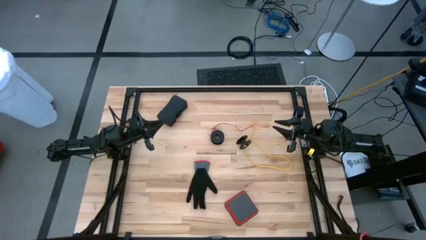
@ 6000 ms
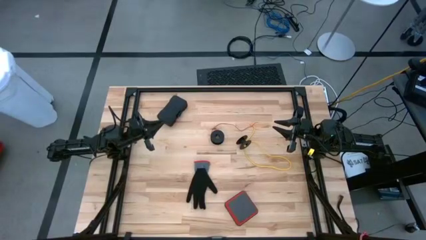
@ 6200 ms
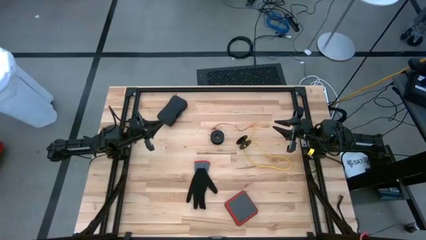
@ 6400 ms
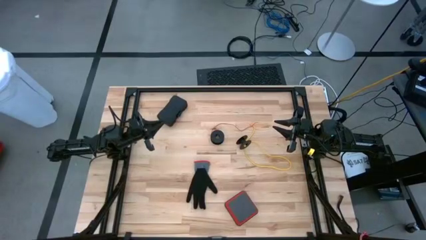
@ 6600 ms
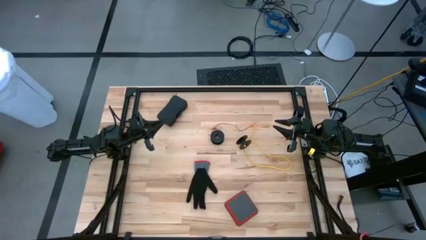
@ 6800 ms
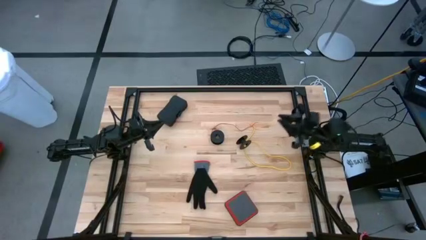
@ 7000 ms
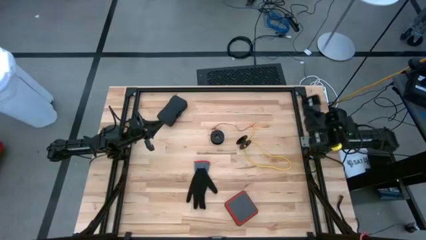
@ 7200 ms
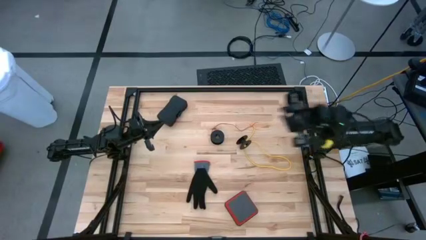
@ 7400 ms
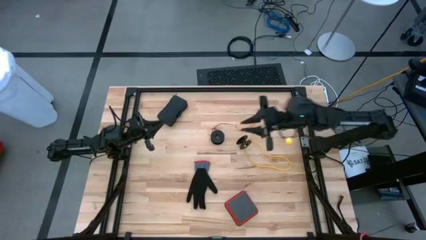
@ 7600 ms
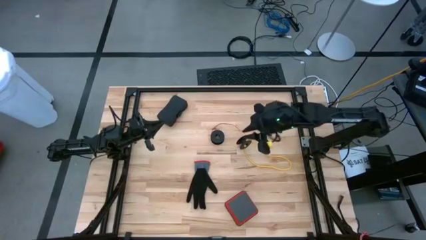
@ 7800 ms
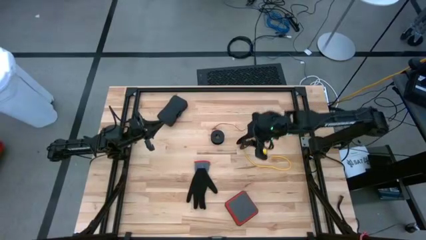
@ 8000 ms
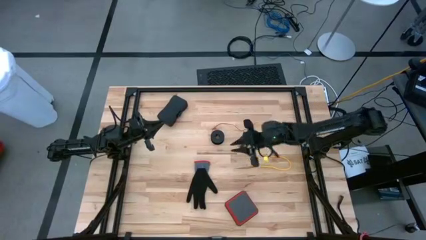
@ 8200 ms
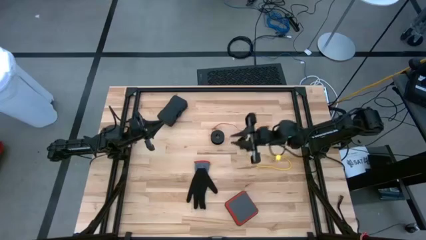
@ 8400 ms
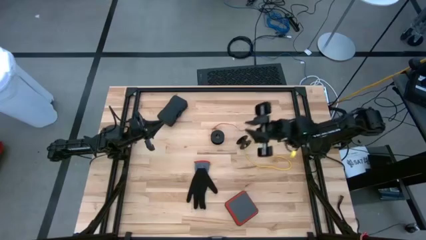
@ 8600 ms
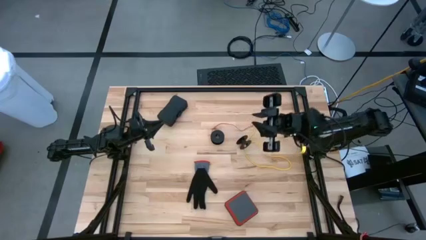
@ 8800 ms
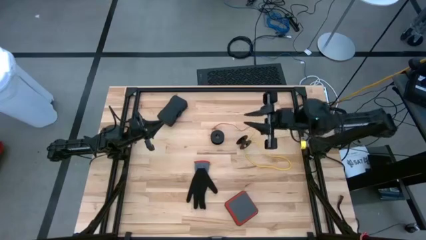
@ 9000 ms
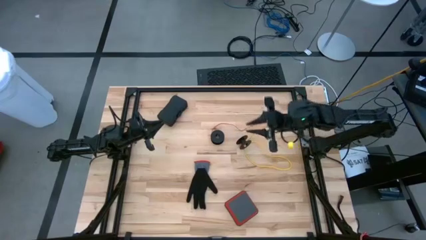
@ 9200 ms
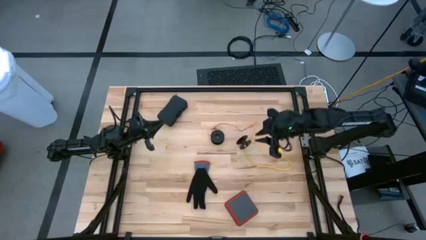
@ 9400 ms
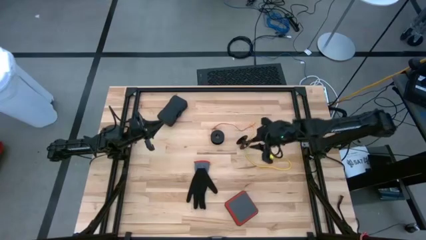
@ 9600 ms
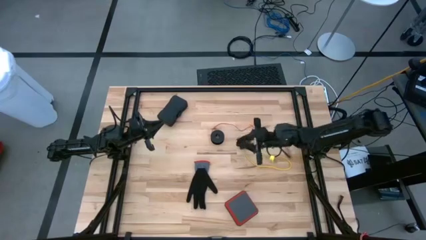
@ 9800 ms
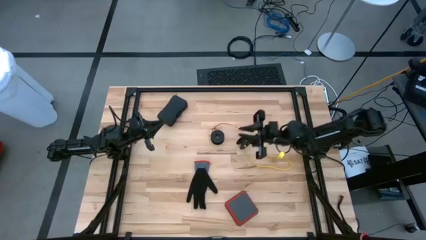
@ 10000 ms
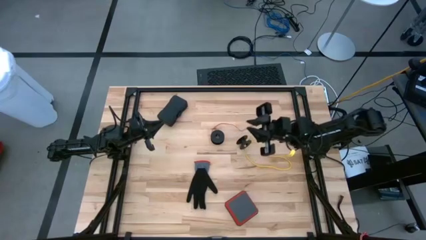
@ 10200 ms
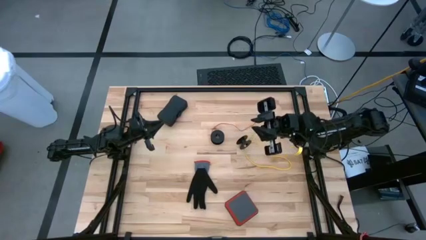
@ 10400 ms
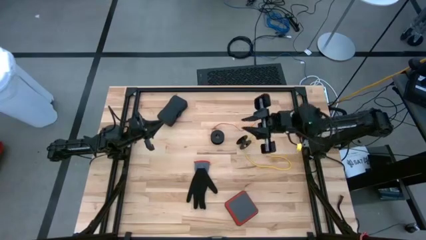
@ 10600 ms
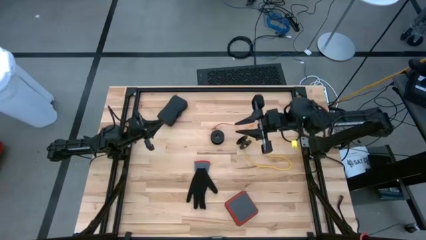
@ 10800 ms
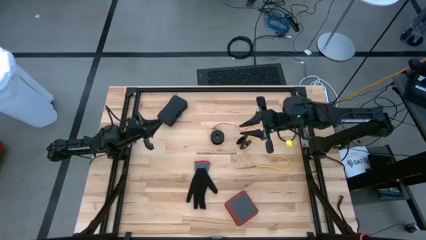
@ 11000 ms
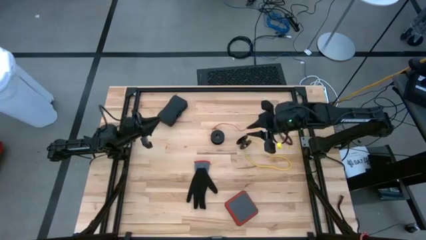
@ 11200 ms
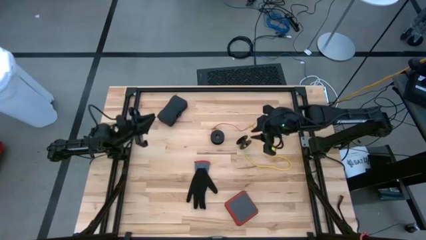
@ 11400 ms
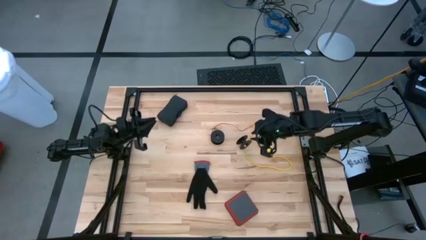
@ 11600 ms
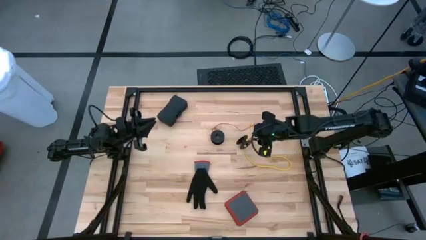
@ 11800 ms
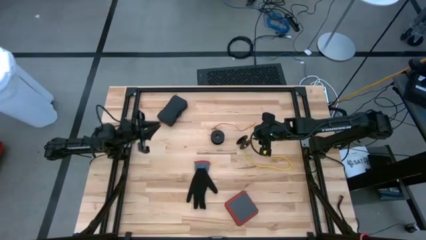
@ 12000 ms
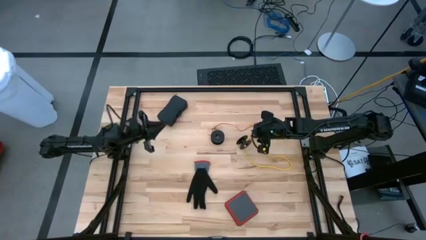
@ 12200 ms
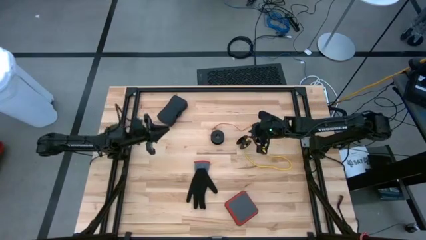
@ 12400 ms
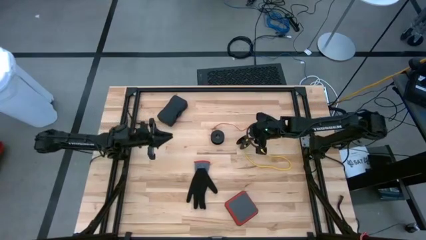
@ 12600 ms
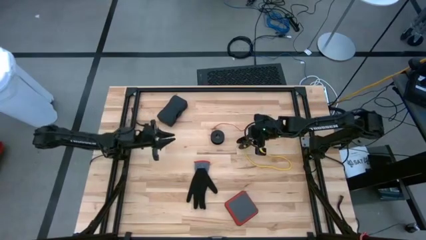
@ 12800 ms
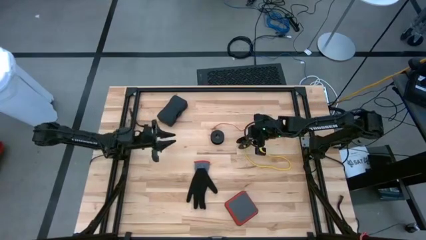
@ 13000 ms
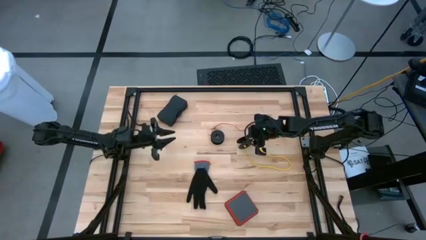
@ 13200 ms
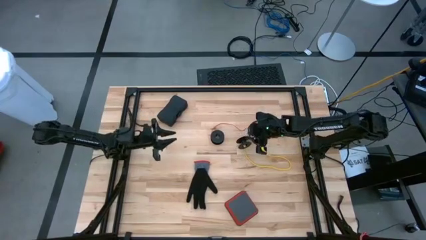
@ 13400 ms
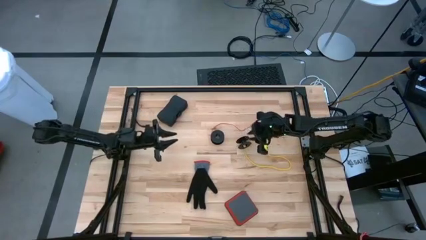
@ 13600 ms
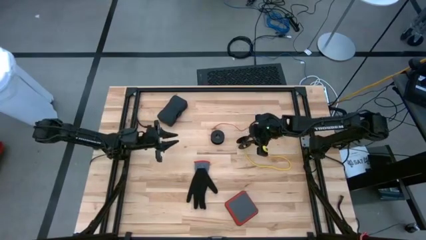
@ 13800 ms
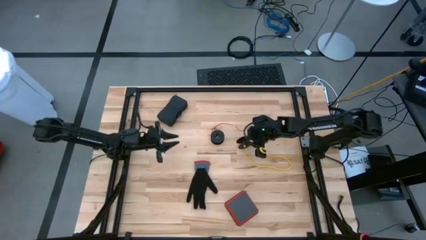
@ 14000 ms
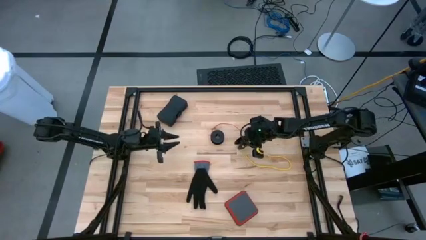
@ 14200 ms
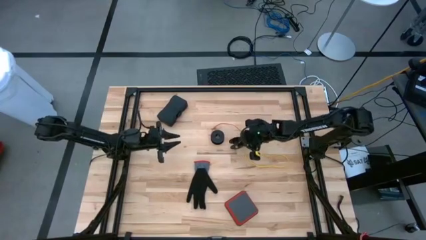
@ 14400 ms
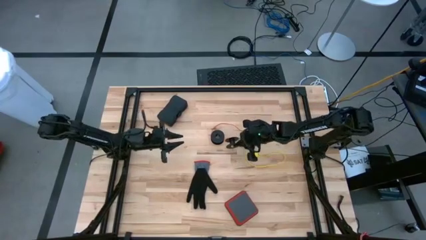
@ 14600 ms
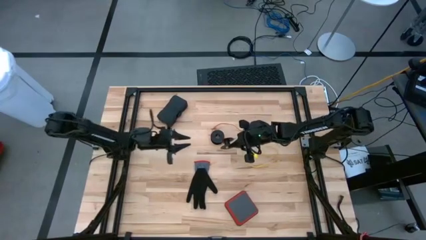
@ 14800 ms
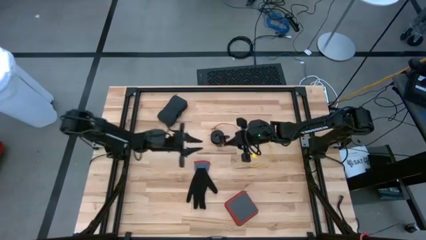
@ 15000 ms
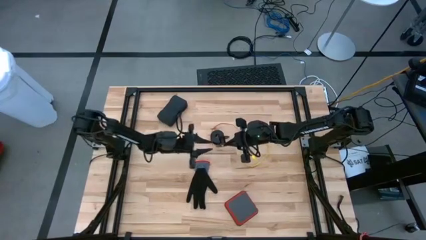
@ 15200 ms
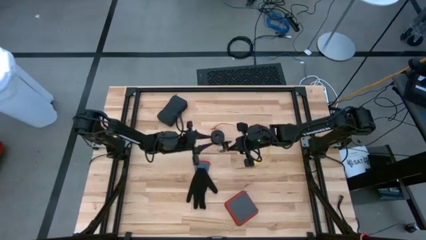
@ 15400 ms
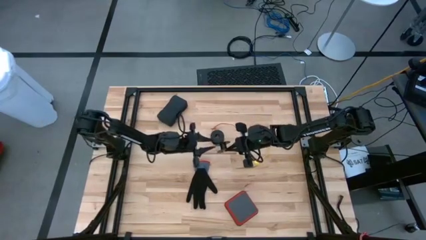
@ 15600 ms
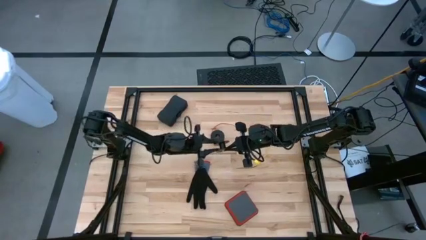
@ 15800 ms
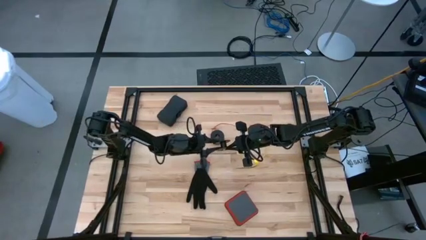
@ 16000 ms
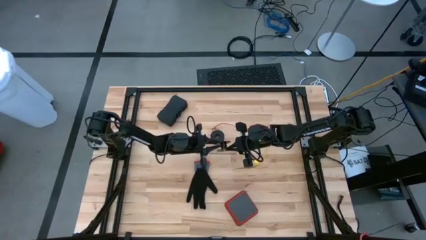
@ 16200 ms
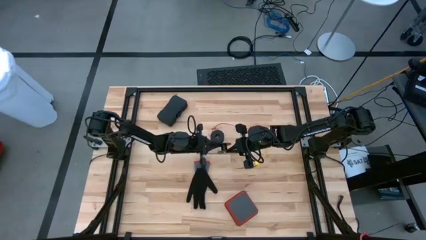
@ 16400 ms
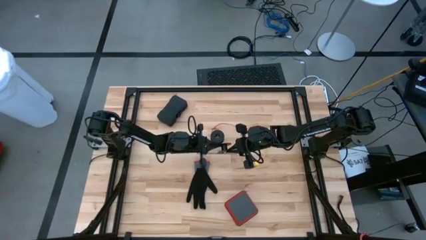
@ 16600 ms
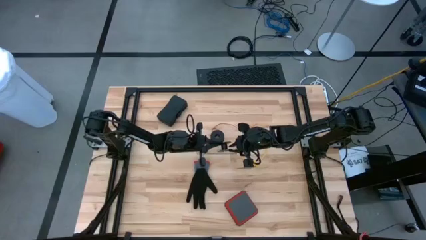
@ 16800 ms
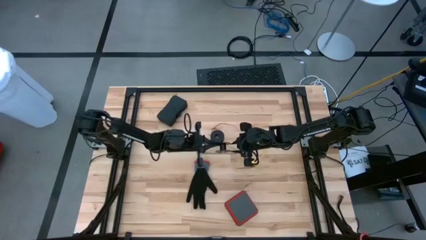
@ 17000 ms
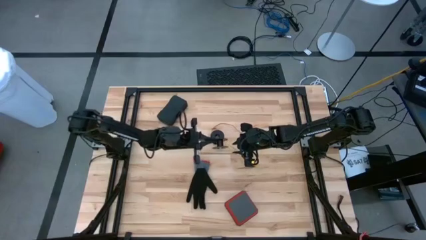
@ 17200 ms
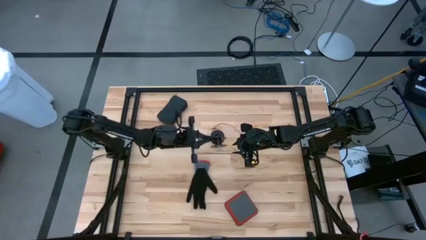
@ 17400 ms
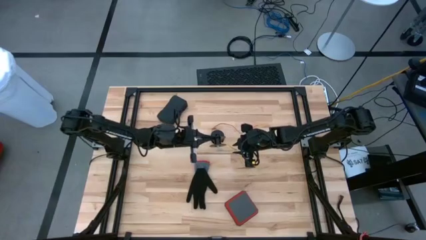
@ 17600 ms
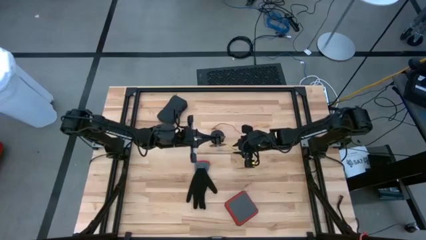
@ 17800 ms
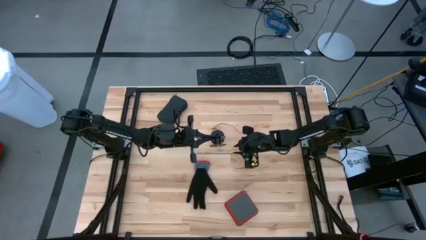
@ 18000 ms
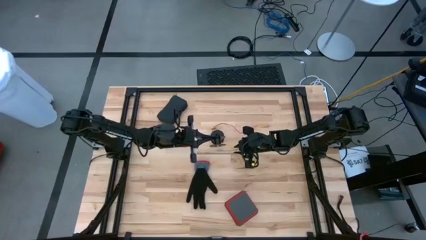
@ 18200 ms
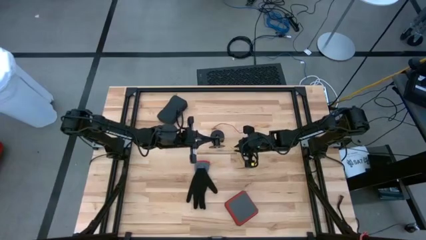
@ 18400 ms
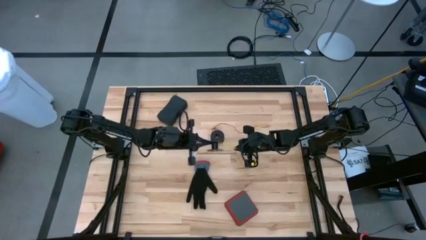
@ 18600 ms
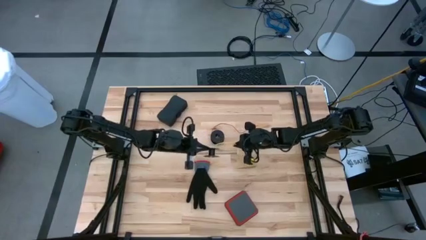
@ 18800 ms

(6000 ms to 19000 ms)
Task: Coil cords
Coil the yellow wire onto the black spool
